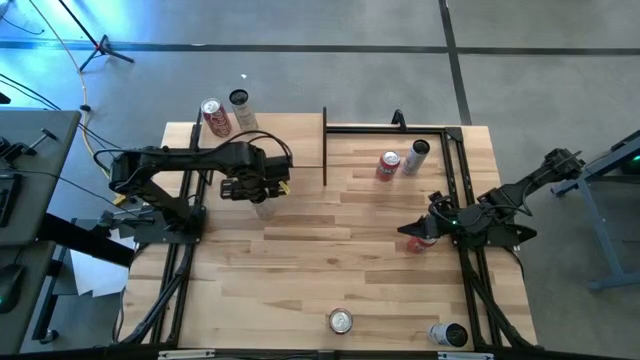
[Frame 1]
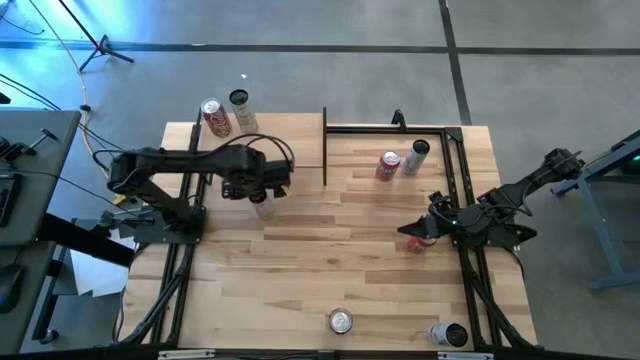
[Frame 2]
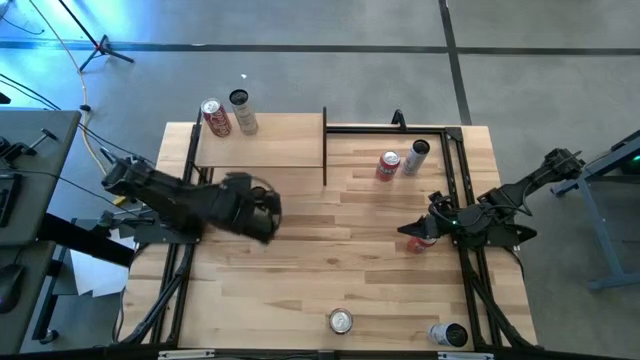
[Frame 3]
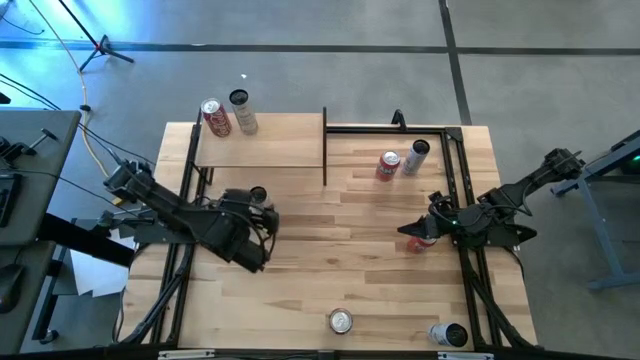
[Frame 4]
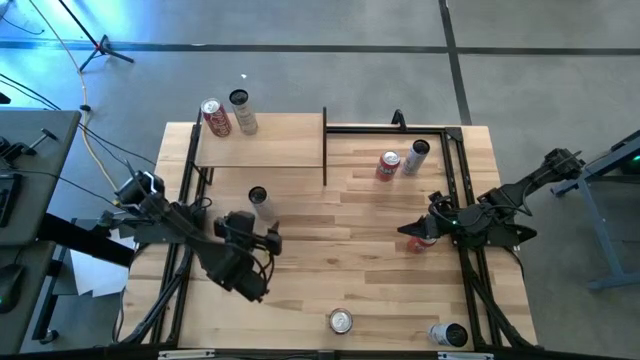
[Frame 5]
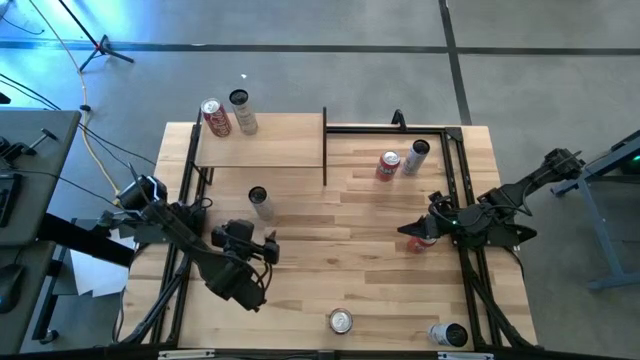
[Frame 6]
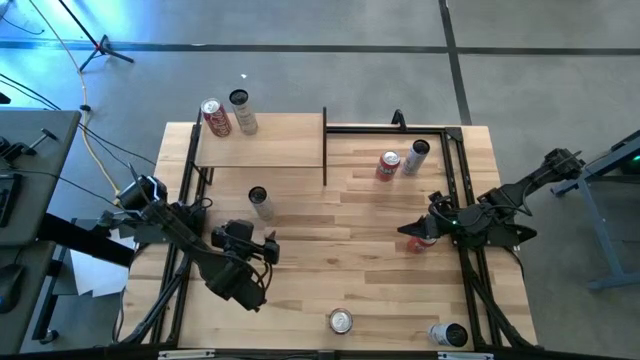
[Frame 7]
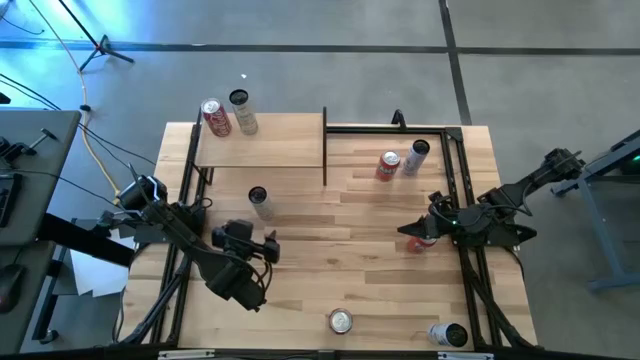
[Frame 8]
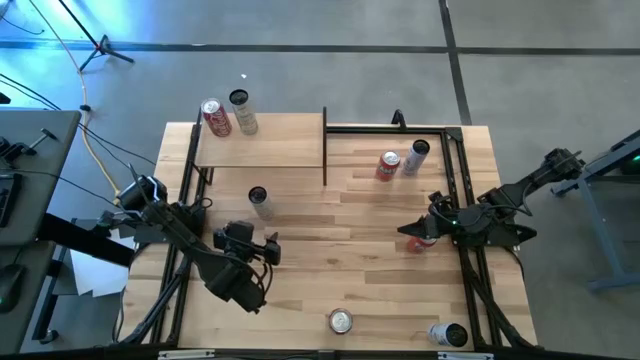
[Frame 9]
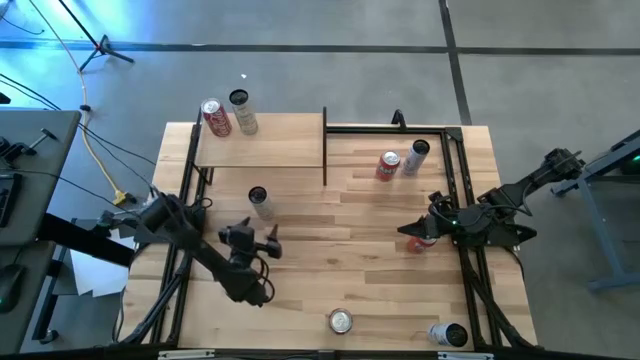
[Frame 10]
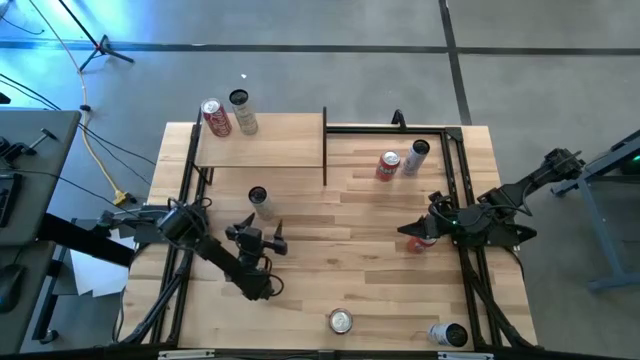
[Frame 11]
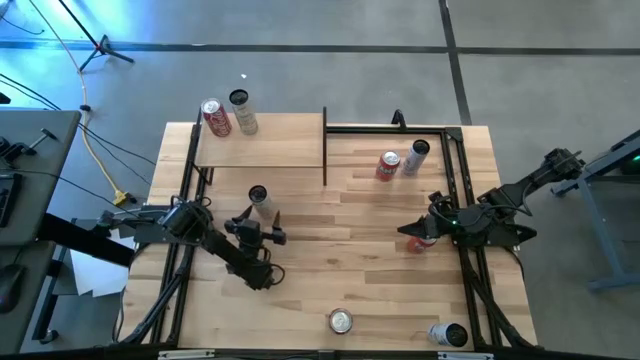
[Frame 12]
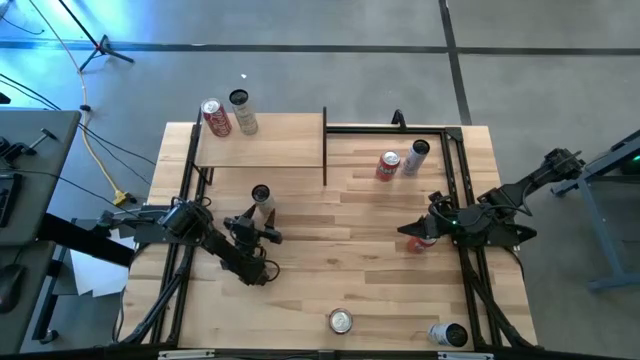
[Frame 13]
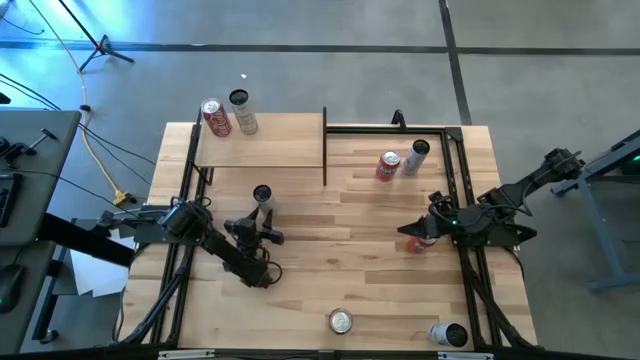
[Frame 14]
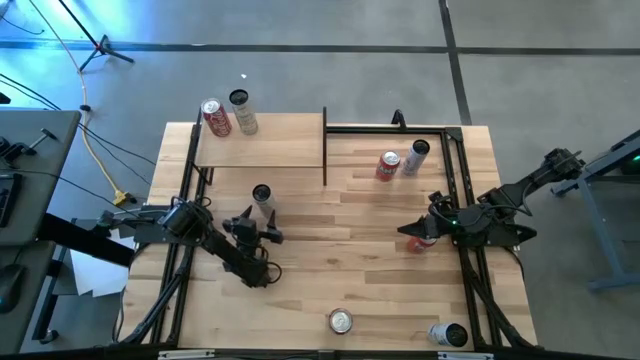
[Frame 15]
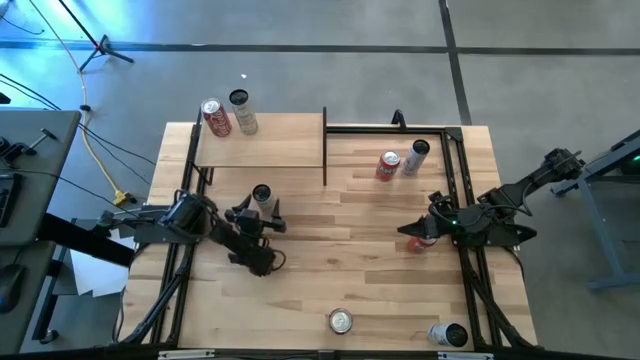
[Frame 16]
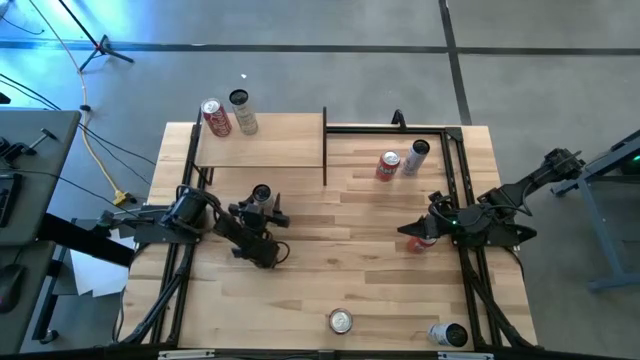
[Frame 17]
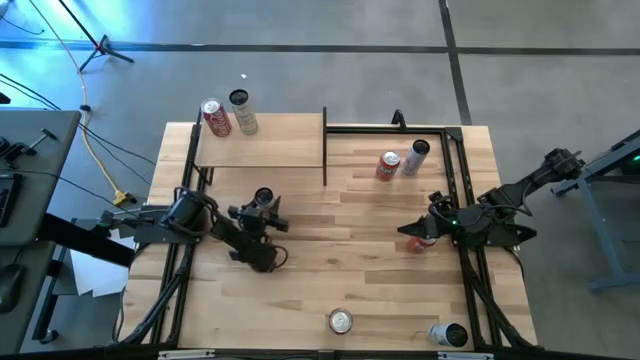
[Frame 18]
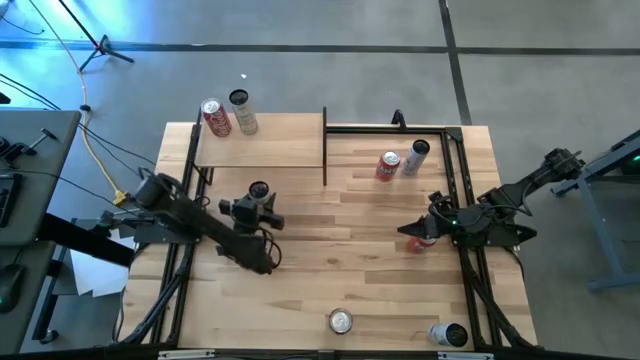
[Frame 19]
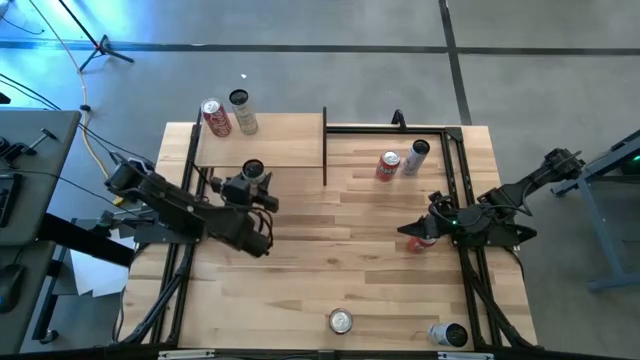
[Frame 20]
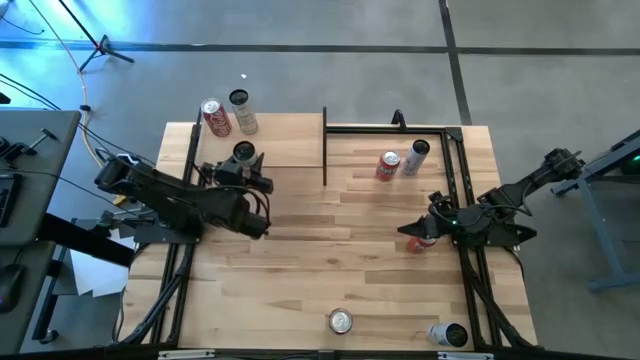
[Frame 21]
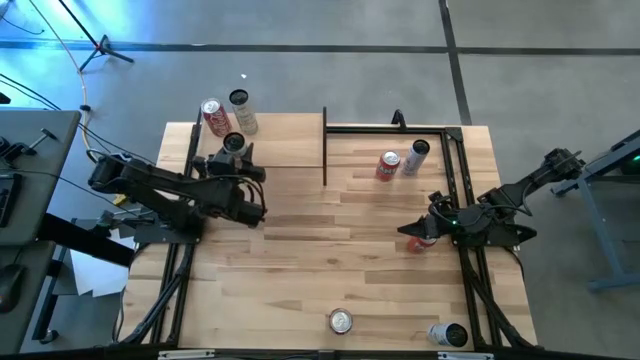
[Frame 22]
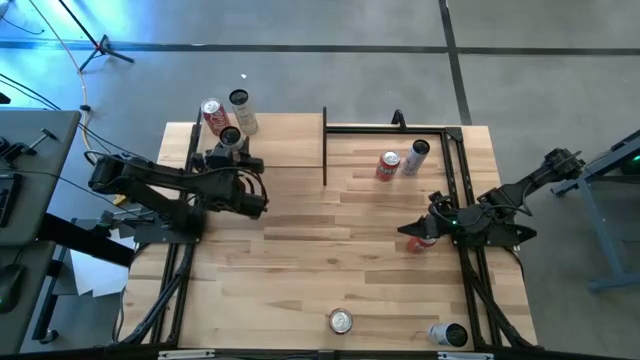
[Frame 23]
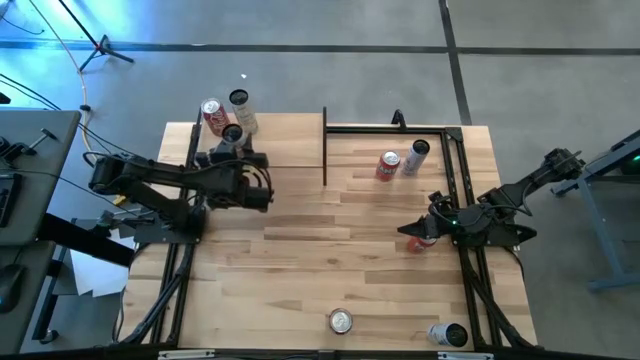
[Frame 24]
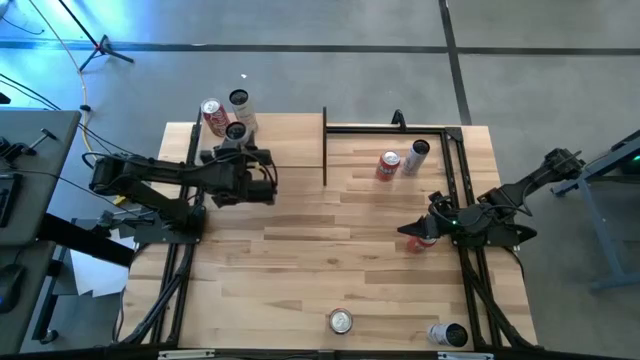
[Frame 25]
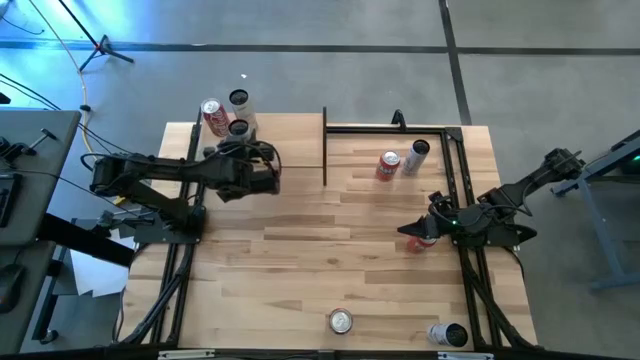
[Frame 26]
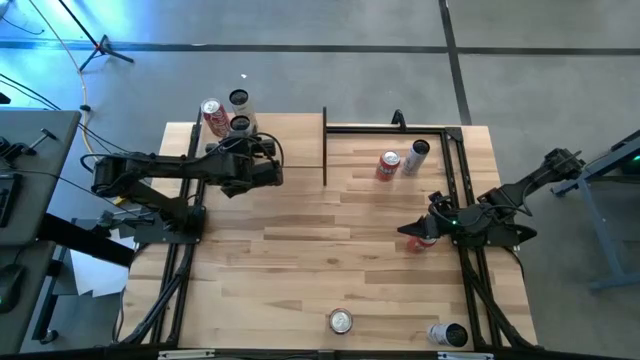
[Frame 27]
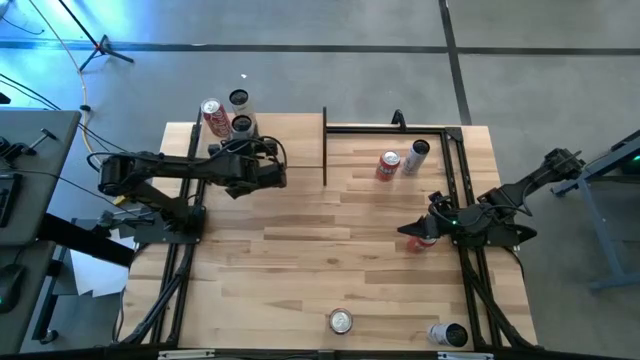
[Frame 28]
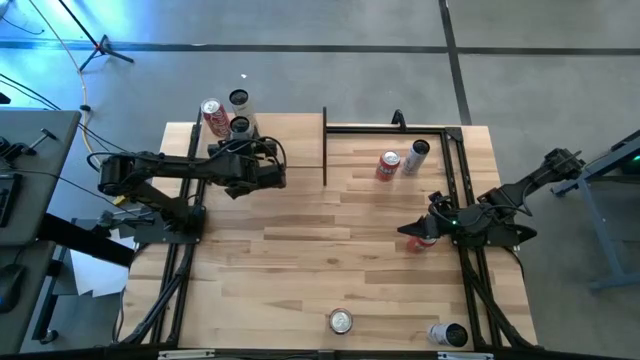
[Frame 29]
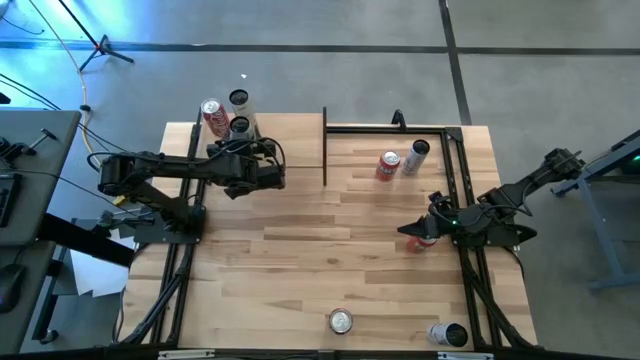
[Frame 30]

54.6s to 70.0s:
Task: Place canned beverage on shelf
Put the light orange soda can on the shelf aligned with the other light orange soda can

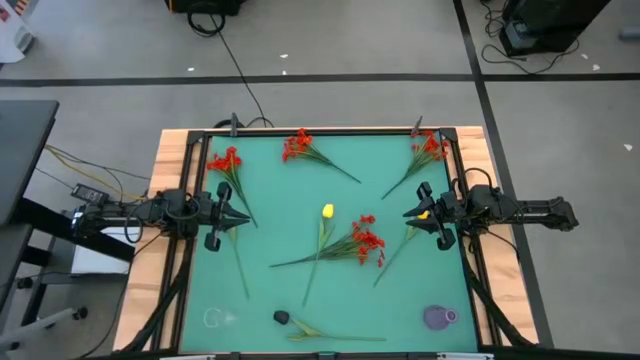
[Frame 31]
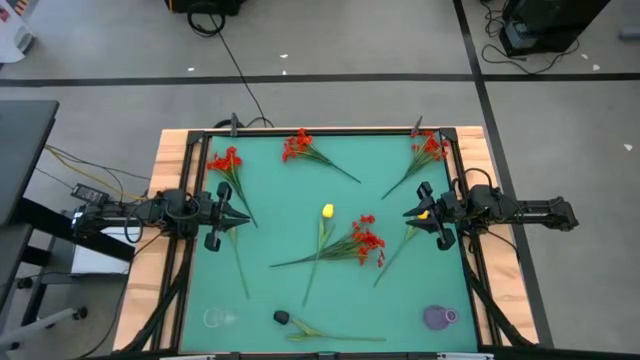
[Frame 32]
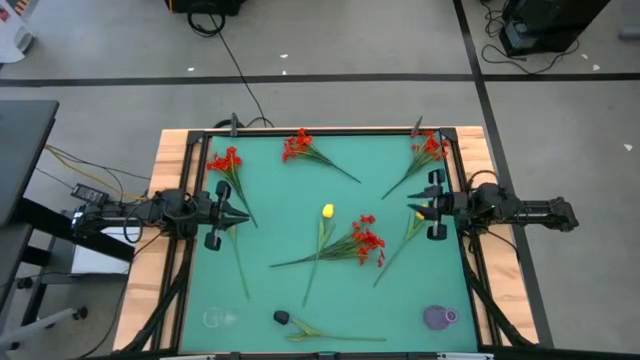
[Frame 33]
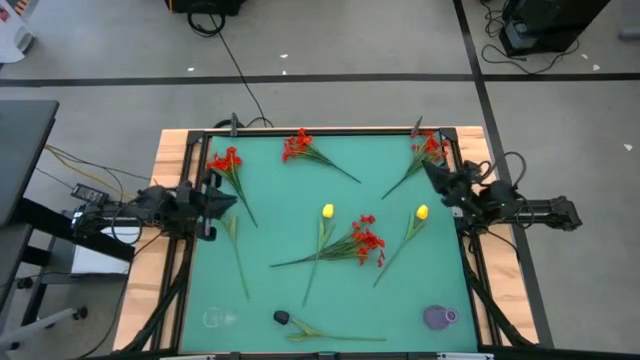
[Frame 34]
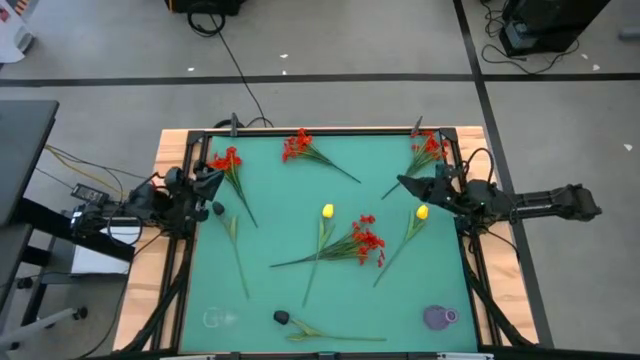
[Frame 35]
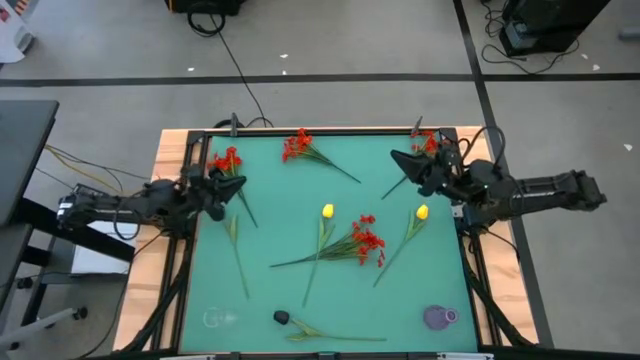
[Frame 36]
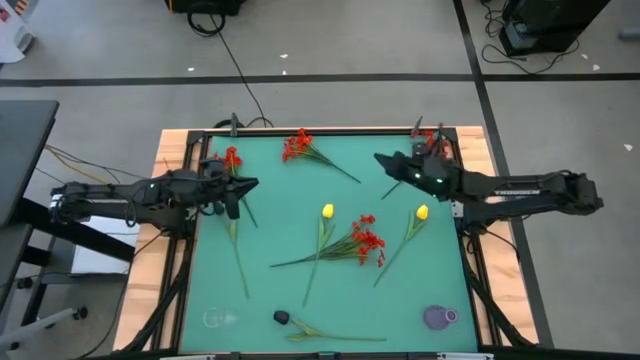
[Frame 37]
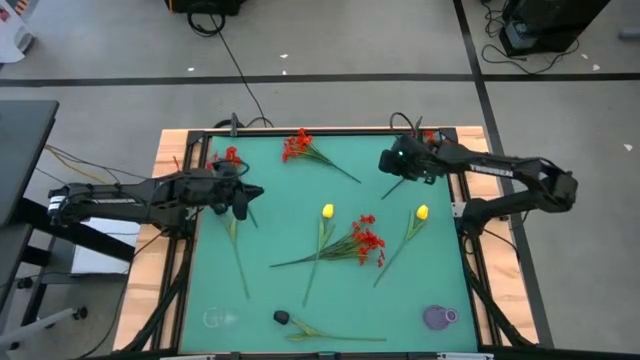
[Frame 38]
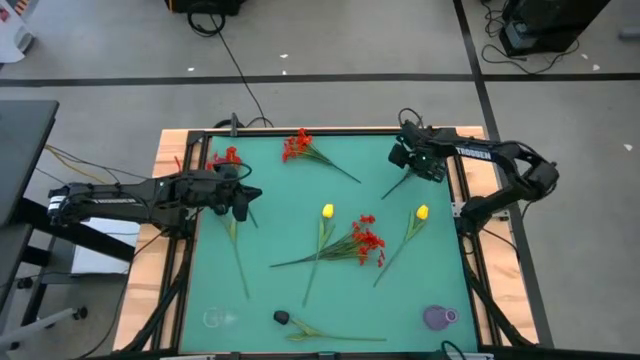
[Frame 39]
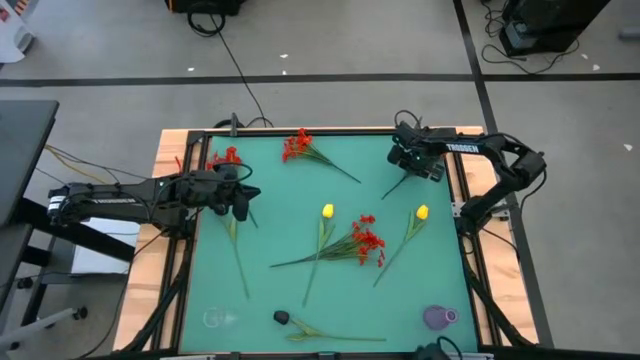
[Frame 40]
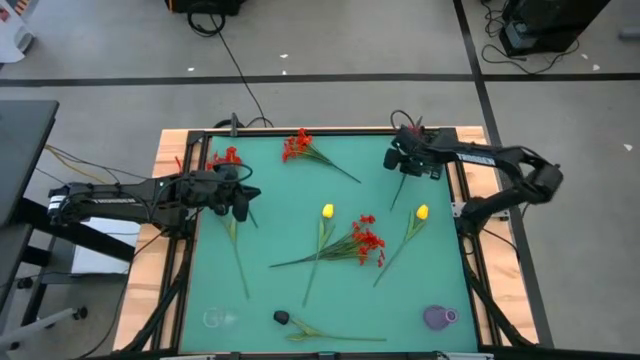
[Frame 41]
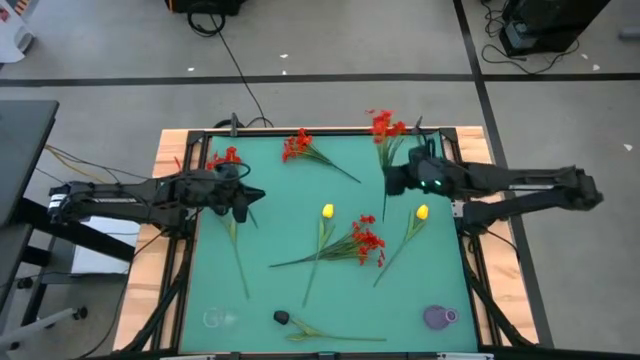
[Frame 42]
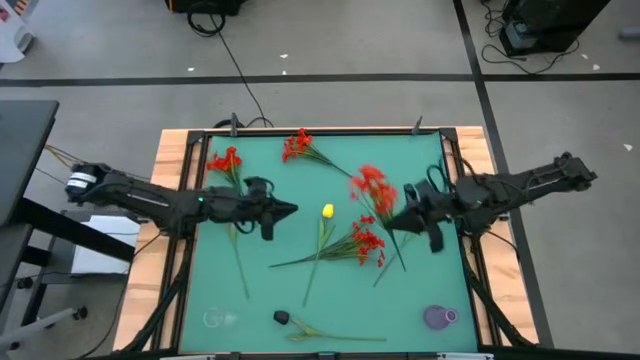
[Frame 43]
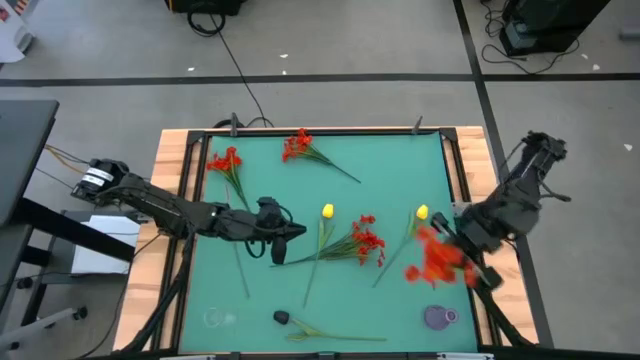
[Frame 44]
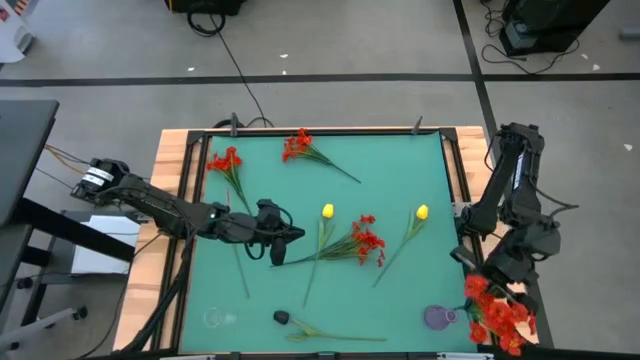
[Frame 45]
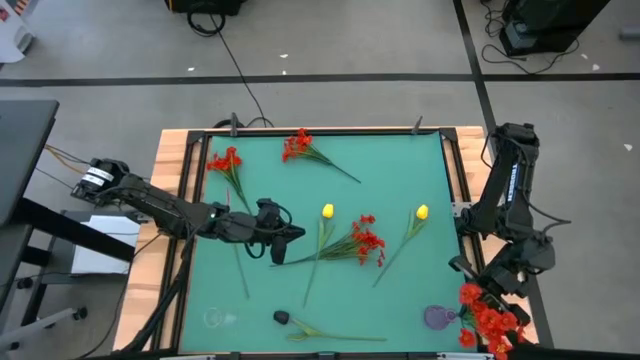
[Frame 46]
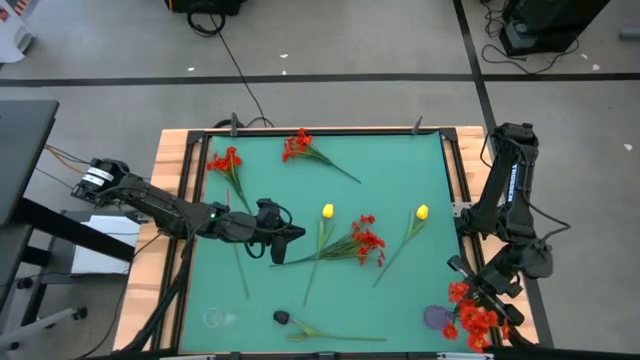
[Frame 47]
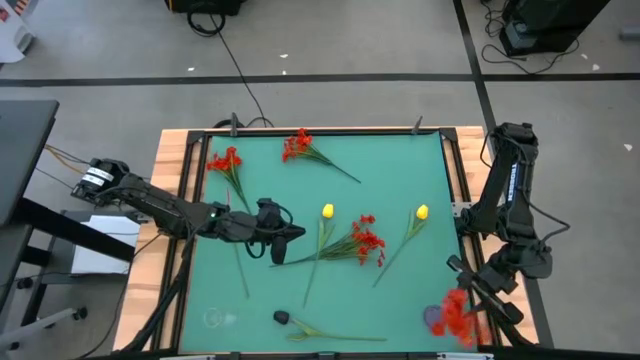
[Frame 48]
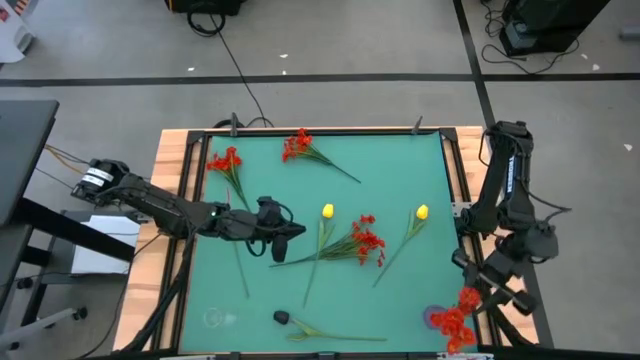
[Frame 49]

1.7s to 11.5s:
Task: Sort flowers into vase by color
Put the top right orange flowers into the violet vase
